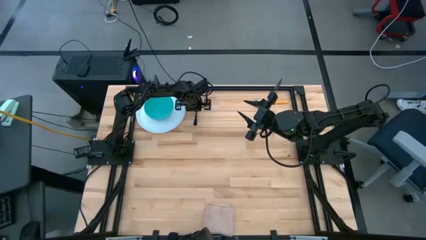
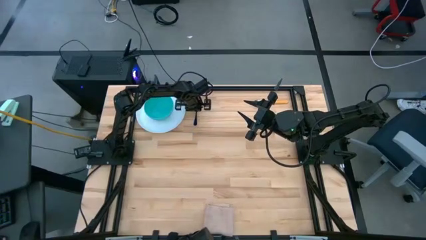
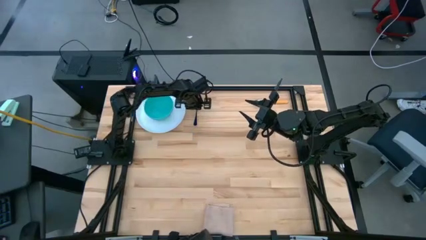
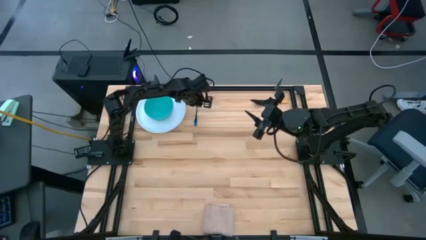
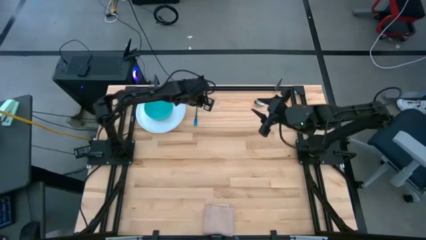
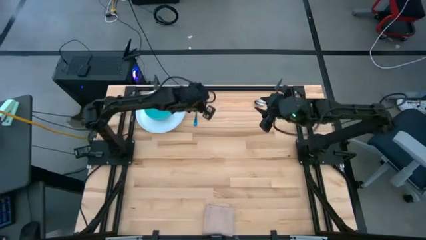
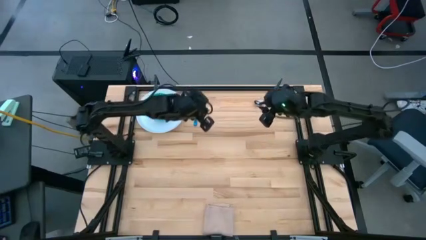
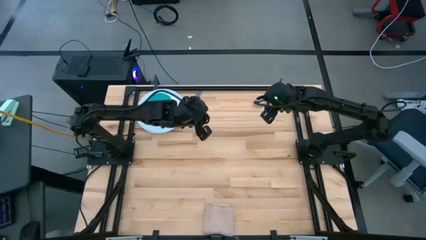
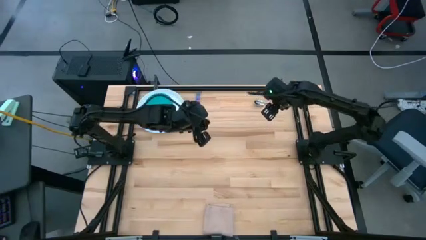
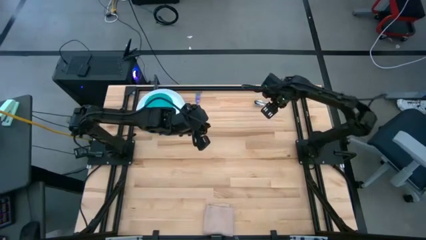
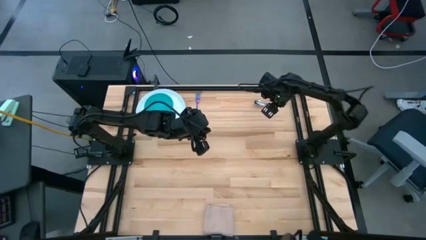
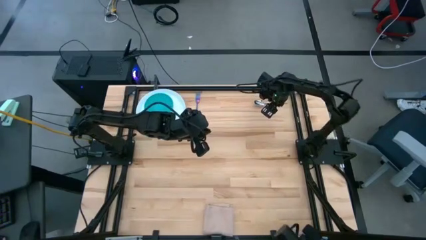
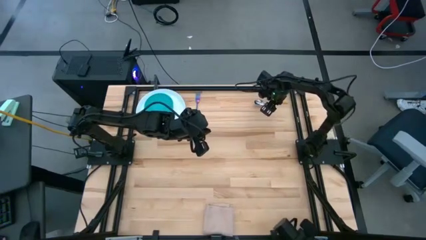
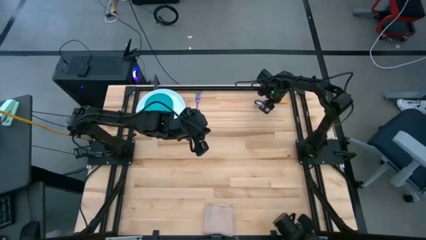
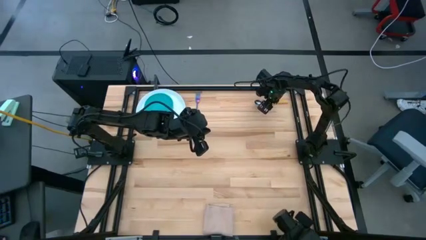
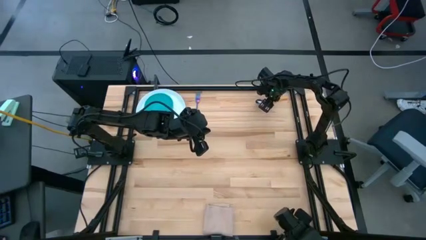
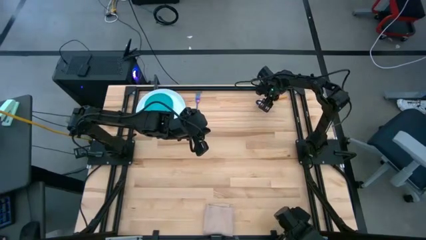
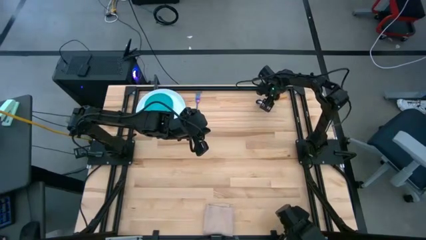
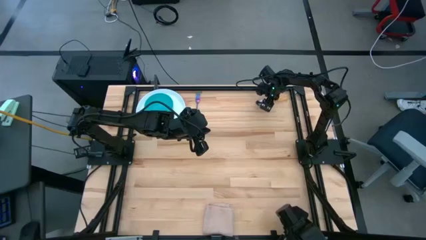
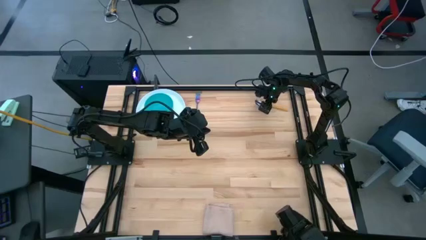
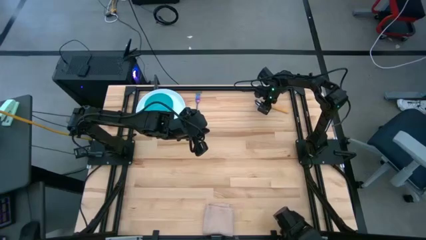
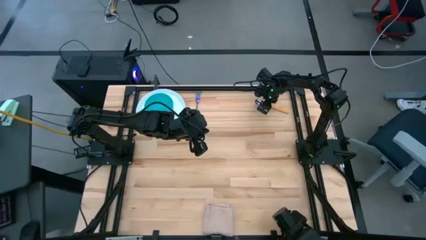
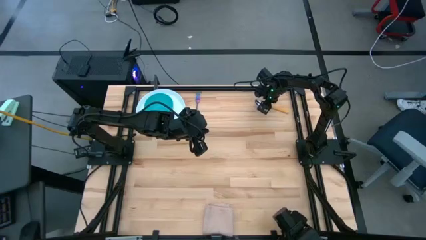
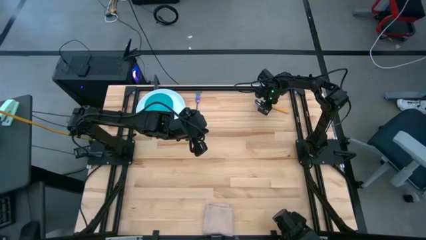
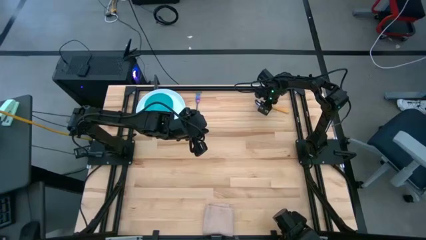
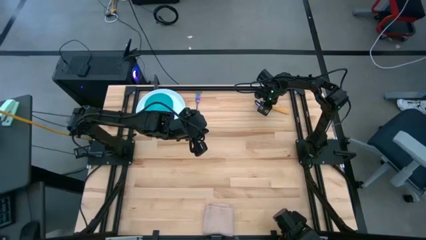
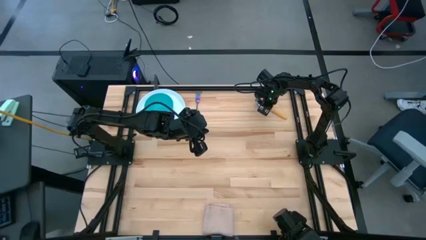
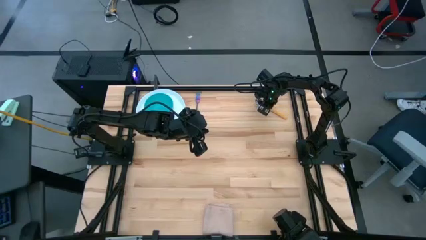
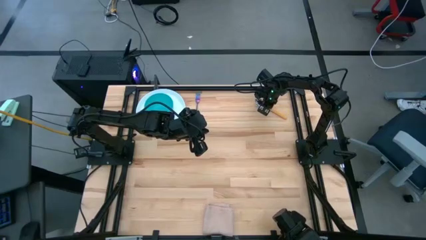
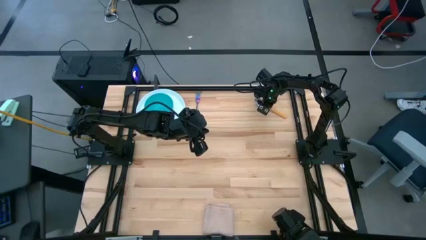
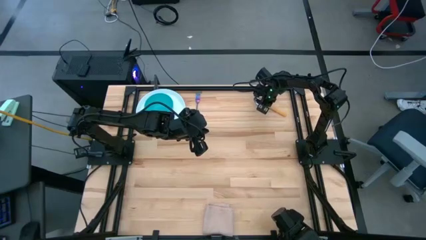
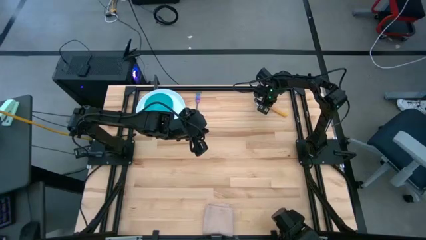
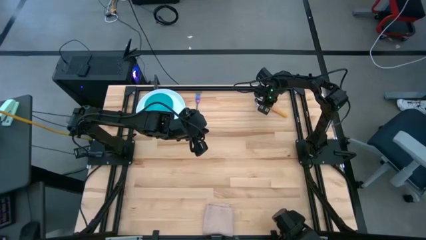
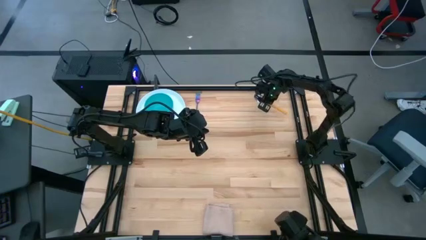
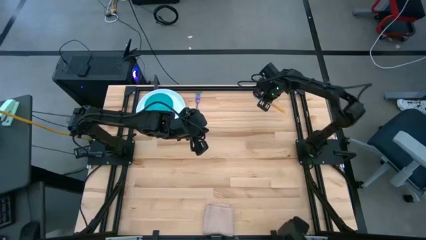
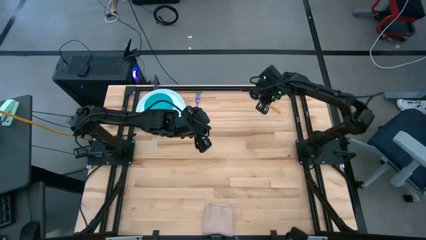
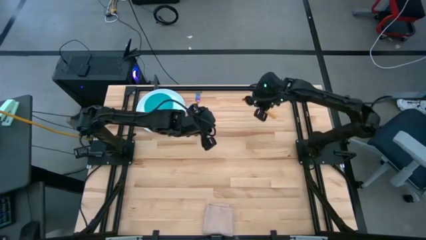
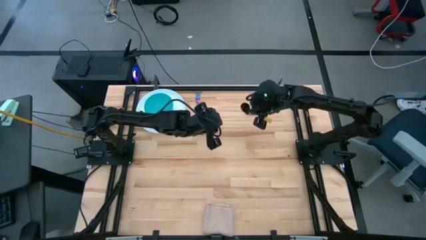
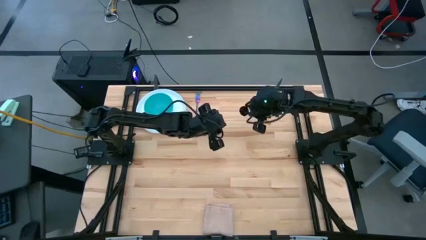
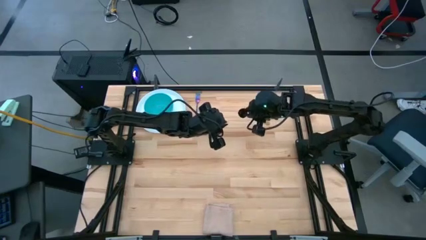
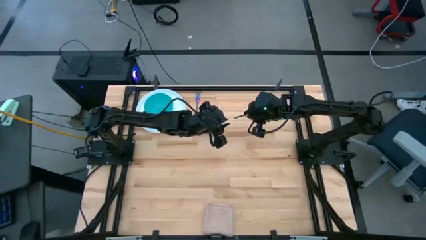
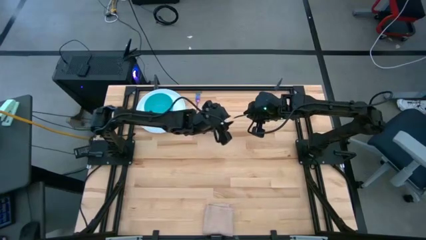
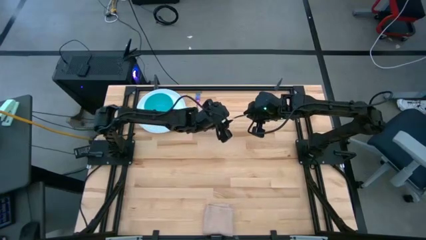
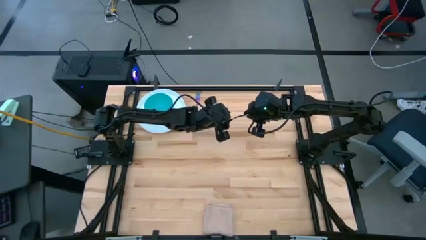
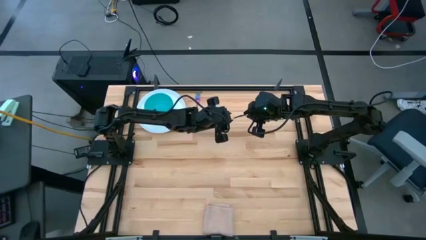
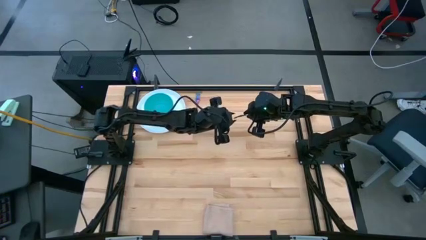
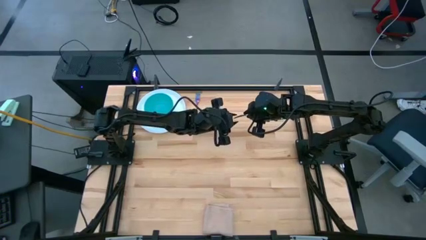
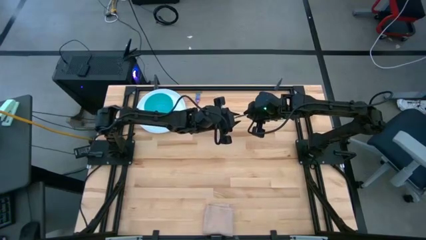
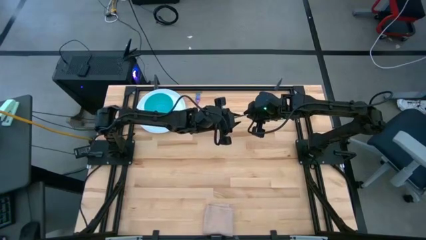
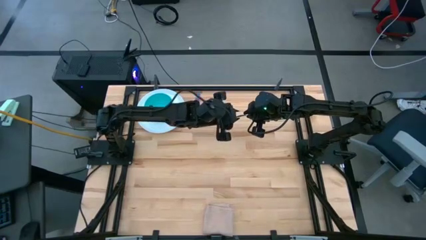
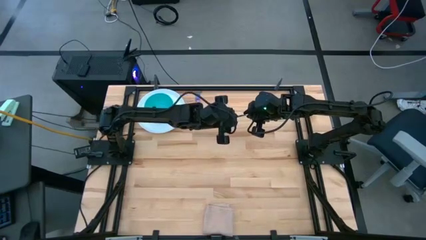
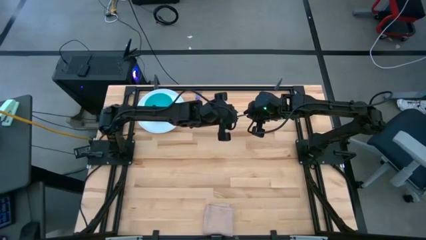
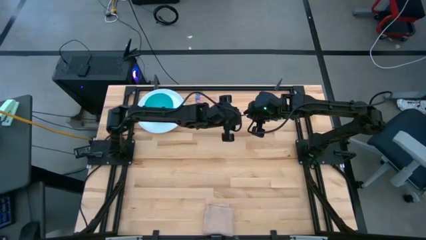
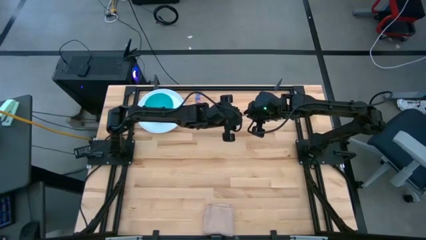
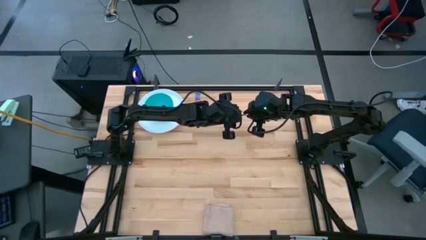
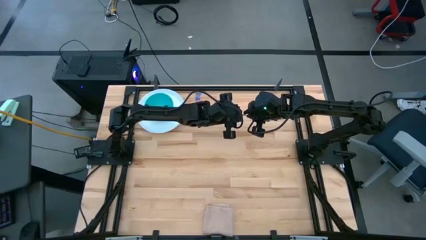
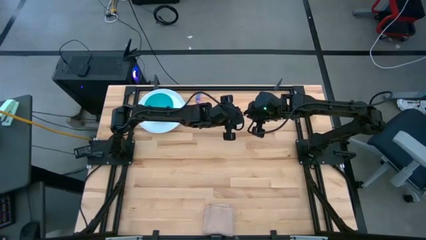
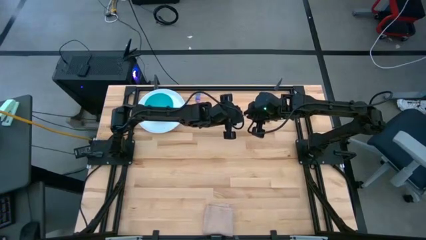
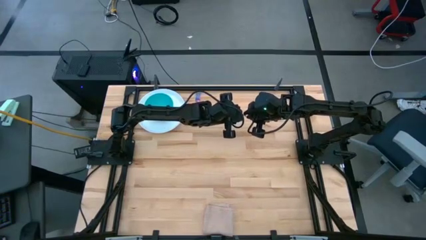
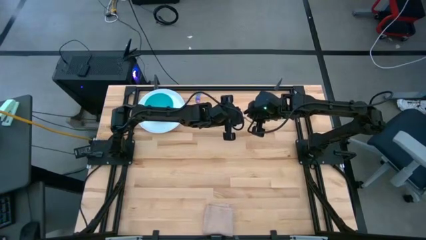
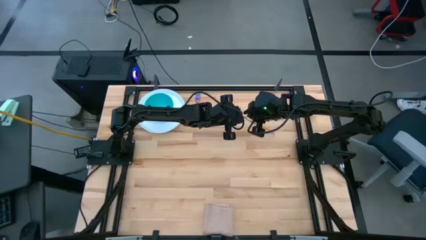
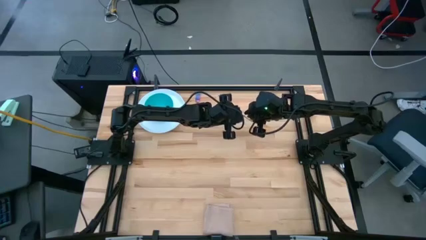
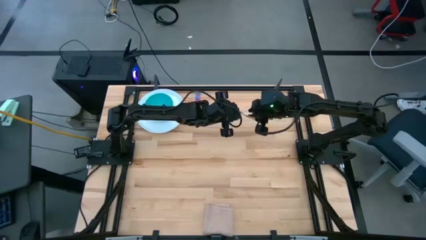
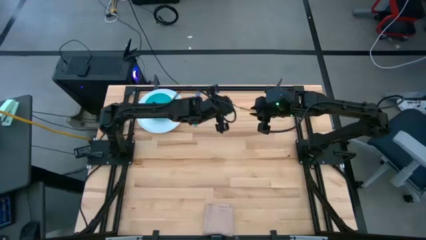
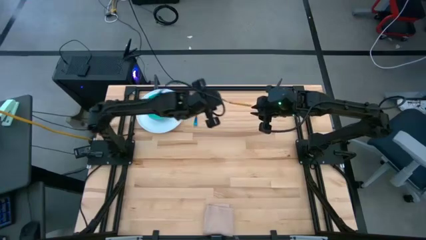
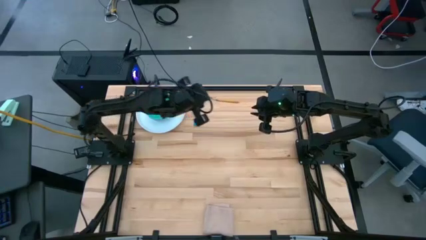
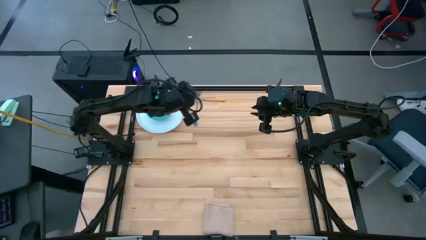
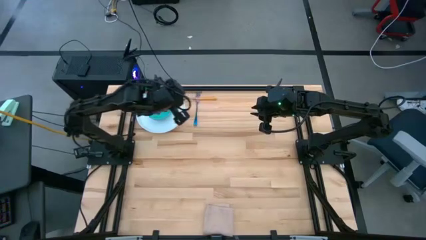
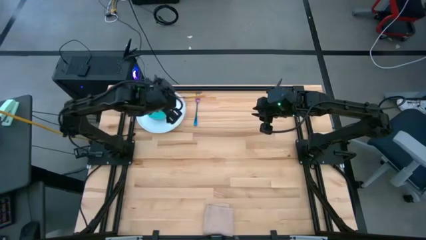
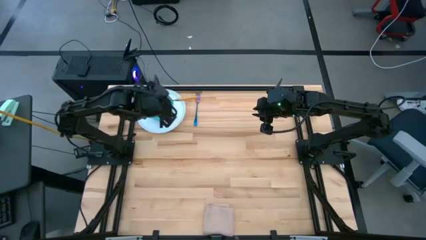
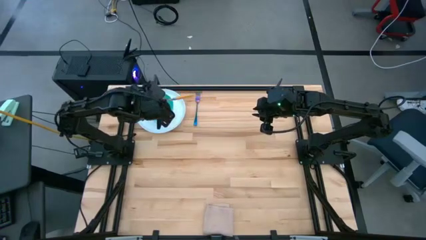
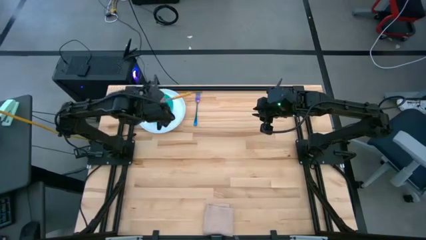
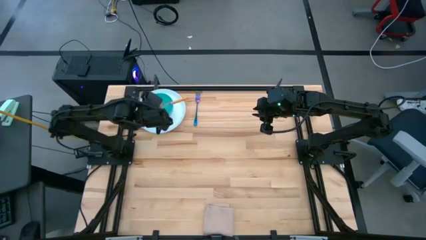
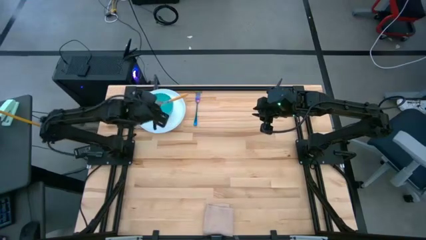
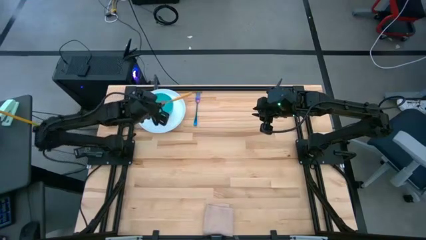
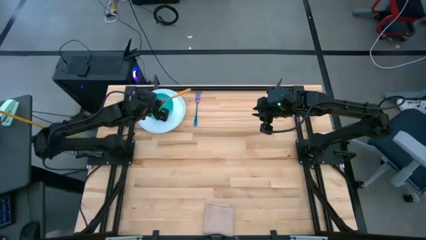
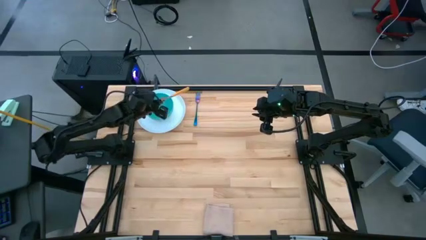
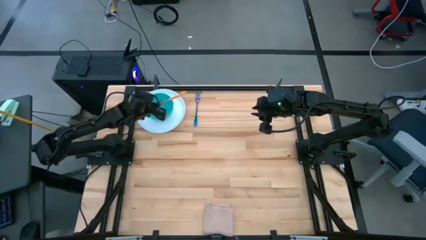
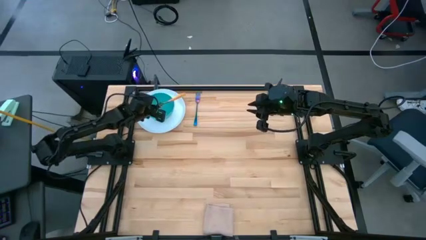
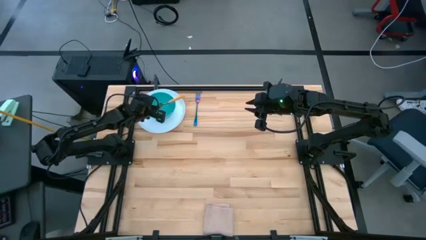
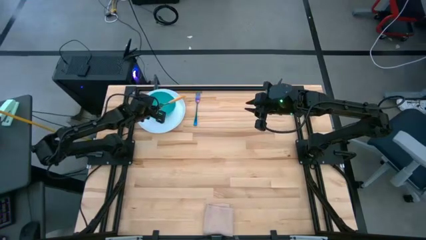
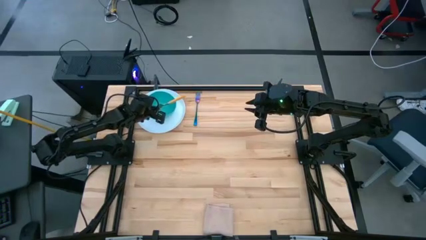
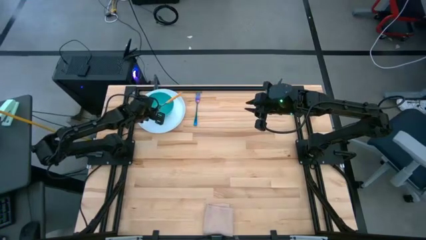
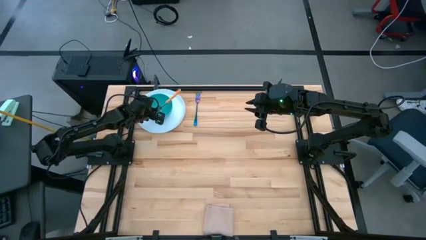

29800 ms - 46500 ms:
Task: Set table place
Put the yellow spoon on the blue bowl
